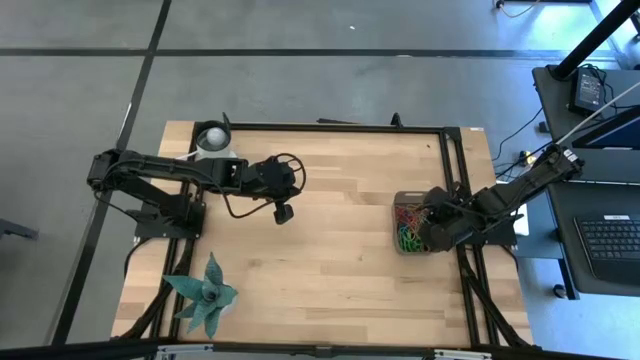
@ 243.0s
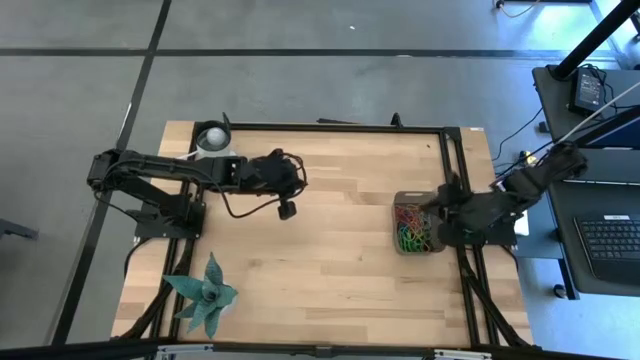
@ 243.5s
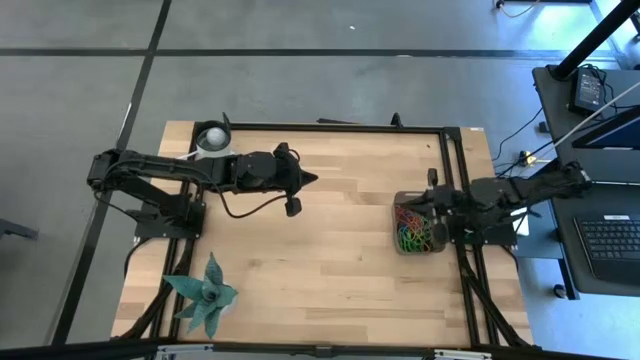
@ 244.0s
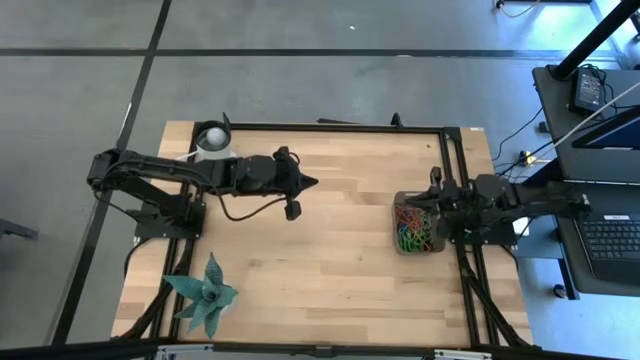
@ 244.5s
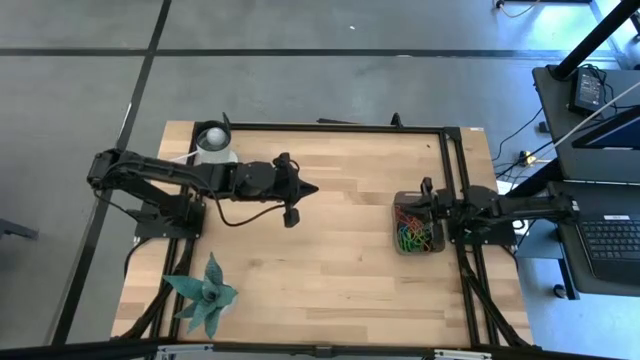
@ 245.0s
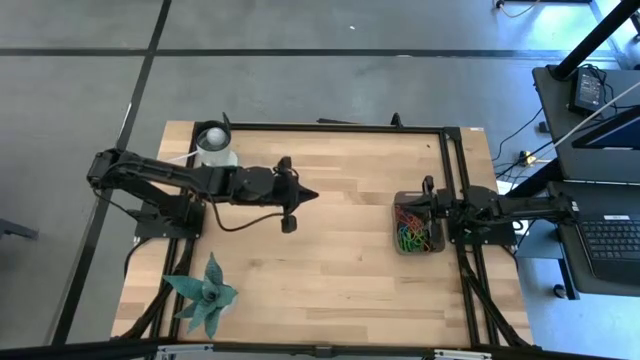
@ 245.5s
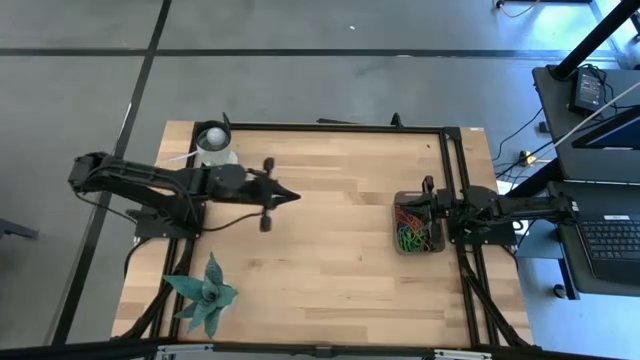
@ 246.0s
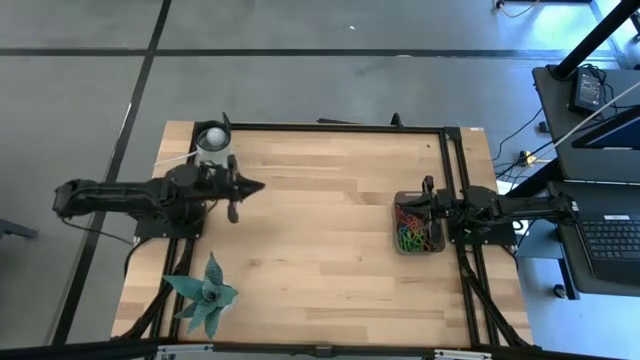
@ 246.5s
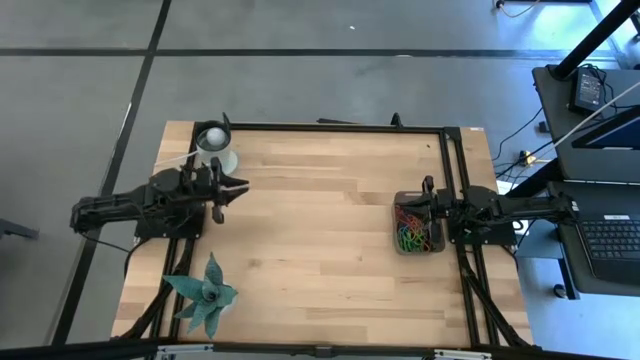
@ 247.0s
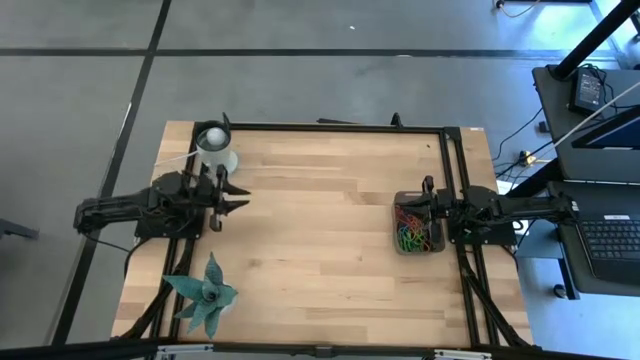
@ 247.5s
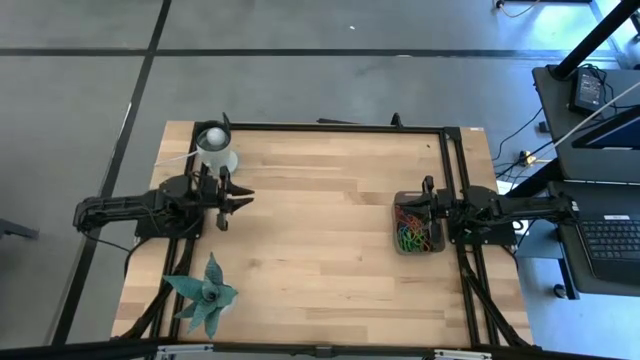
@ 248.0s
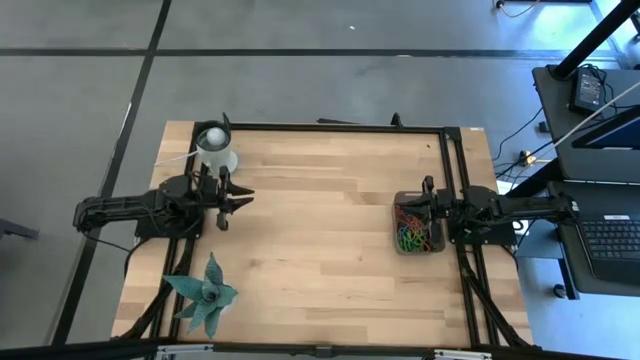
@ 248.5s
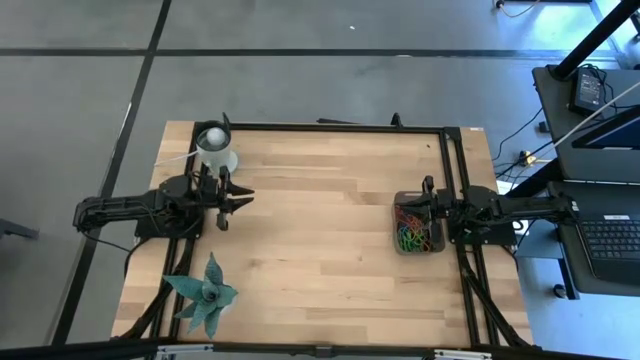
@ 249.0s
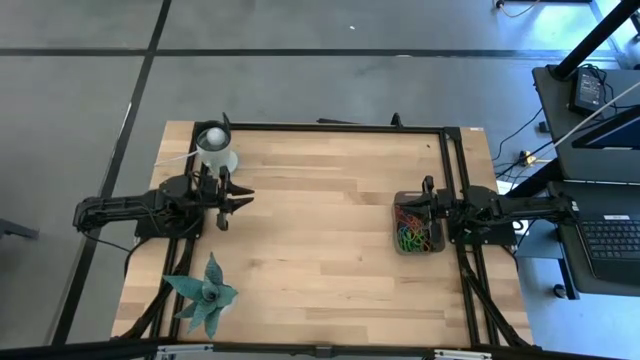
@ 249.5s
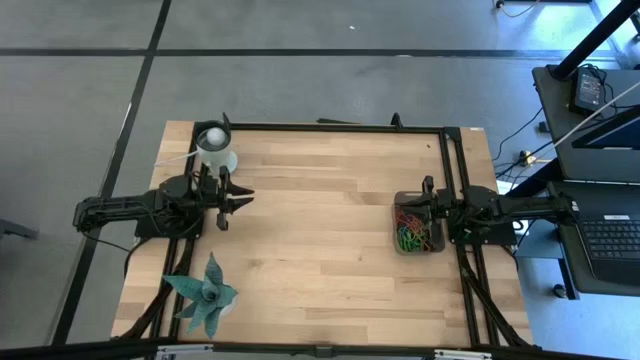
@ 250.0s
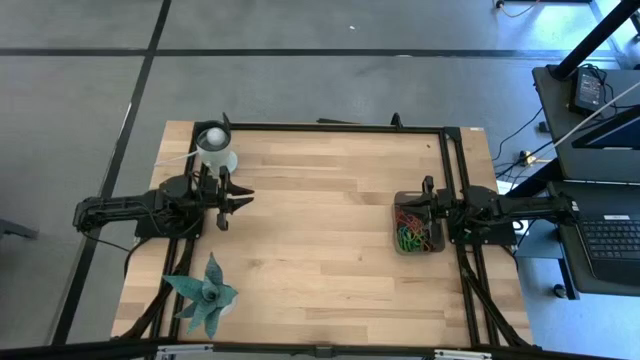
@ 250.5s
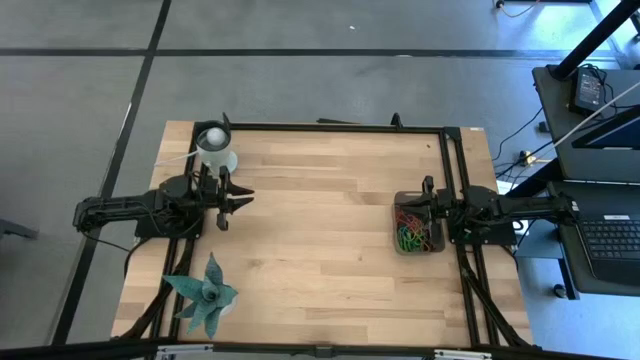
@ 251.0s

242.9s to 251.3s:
Task: Pick and place rubber bands into bin
Return to Home Position

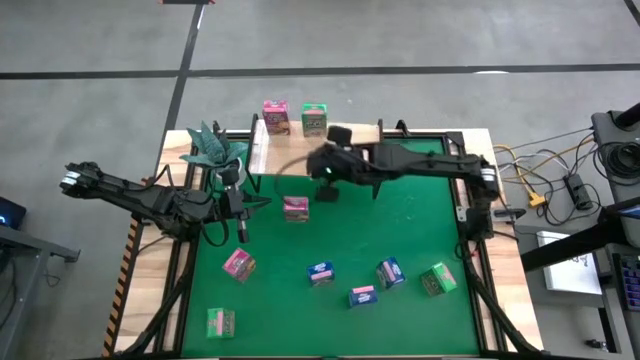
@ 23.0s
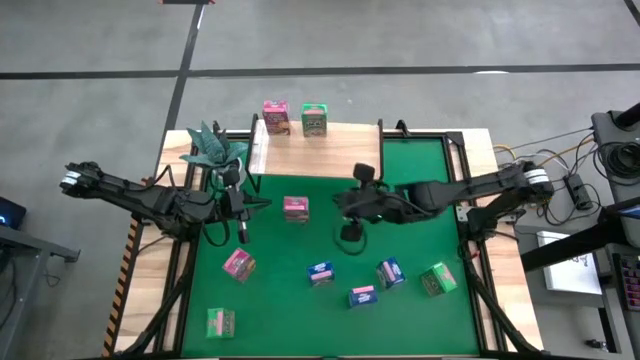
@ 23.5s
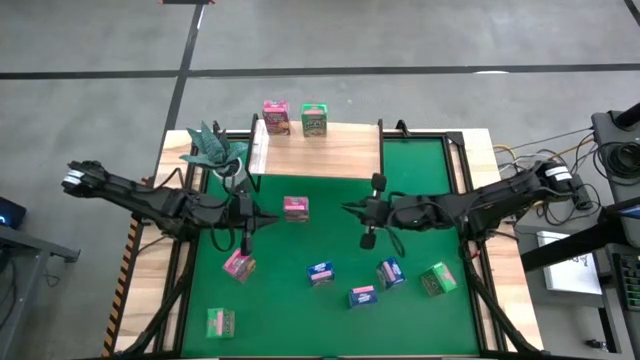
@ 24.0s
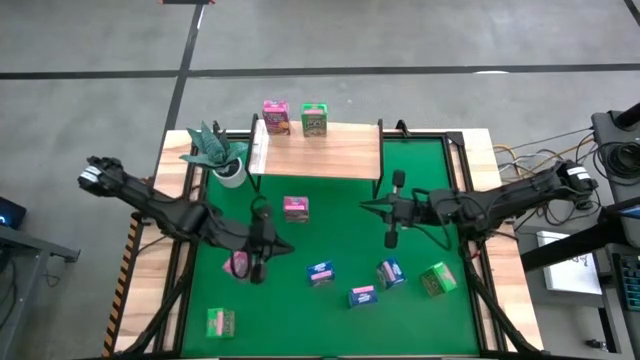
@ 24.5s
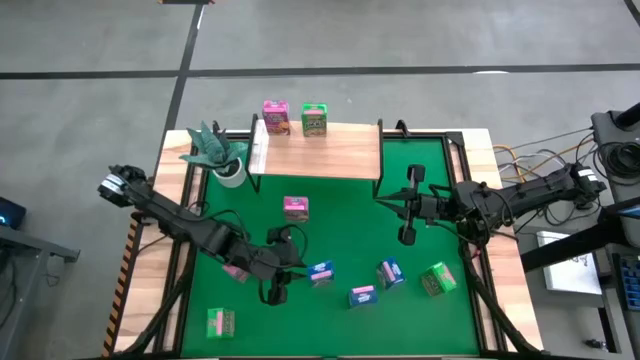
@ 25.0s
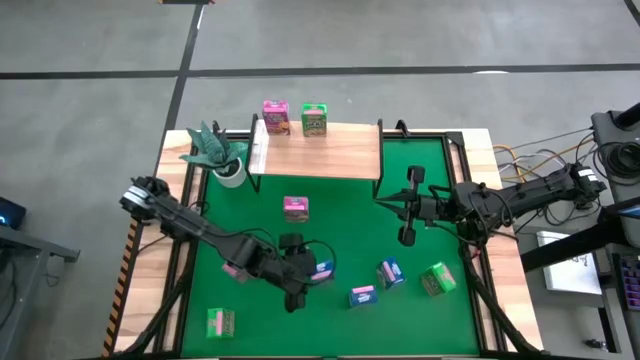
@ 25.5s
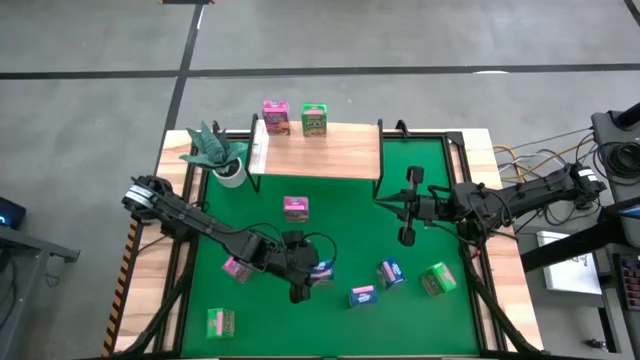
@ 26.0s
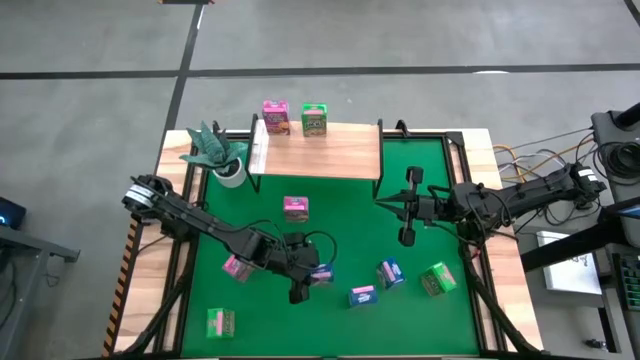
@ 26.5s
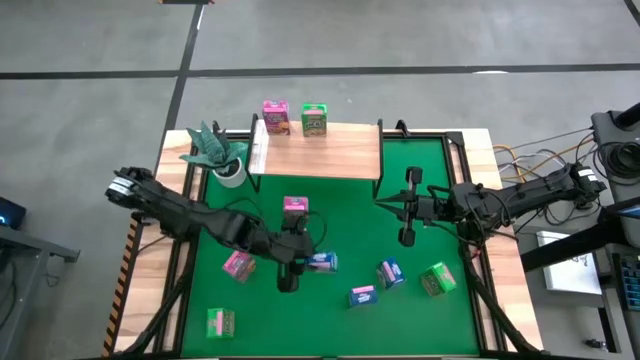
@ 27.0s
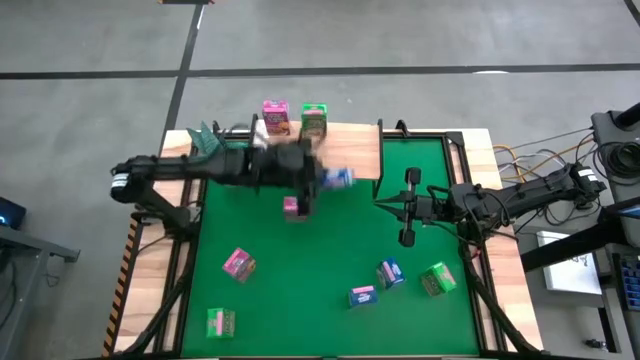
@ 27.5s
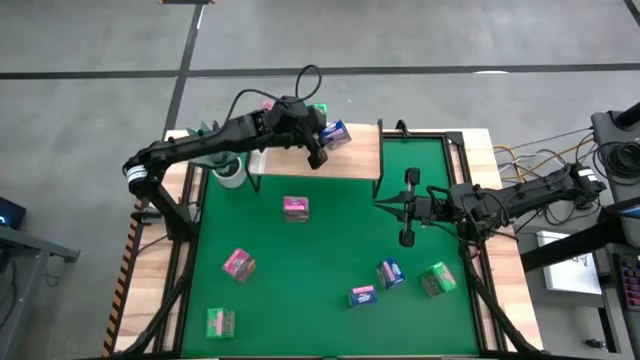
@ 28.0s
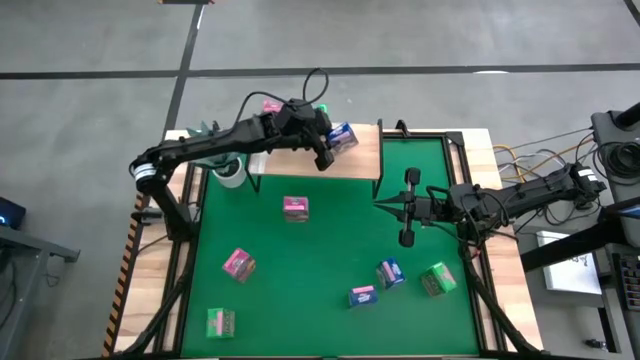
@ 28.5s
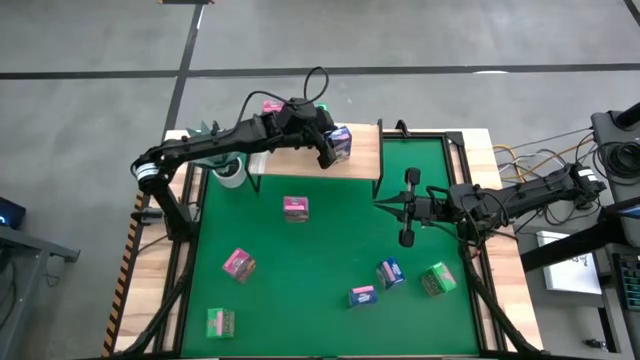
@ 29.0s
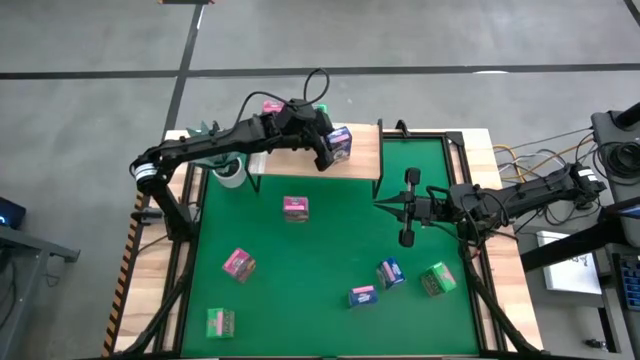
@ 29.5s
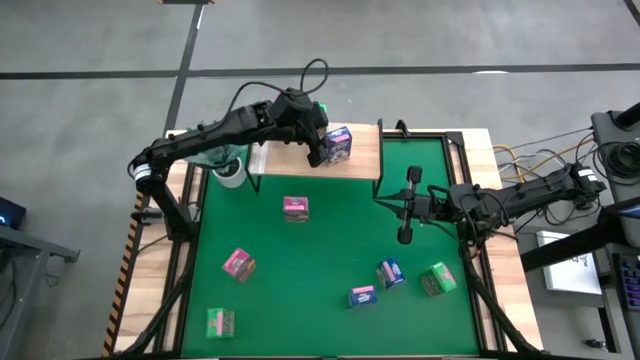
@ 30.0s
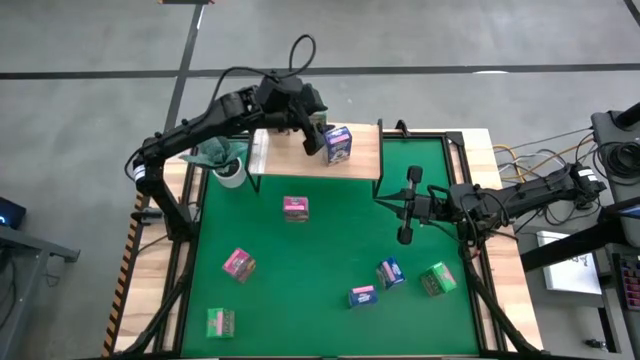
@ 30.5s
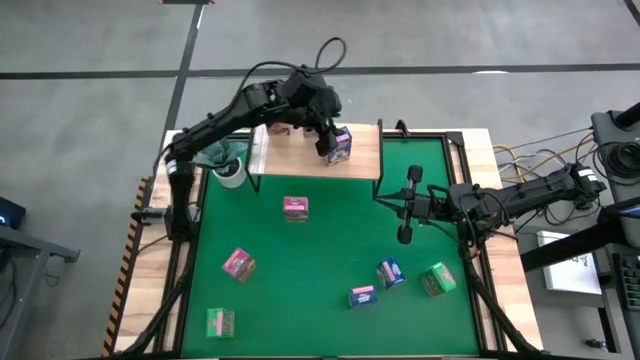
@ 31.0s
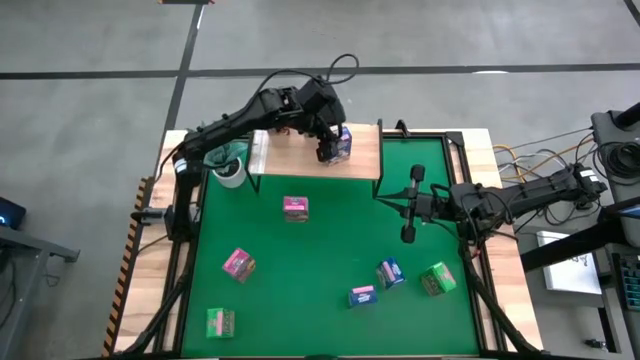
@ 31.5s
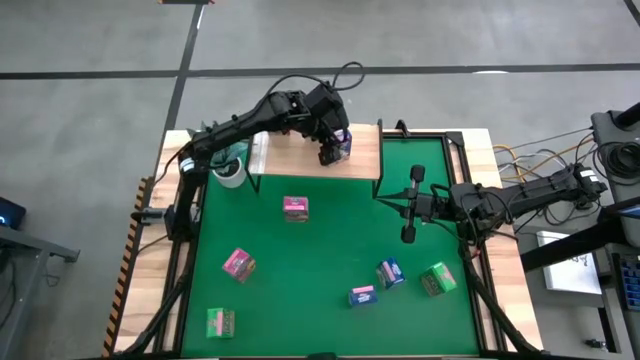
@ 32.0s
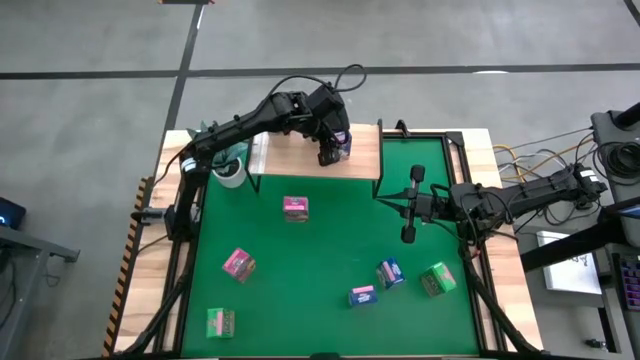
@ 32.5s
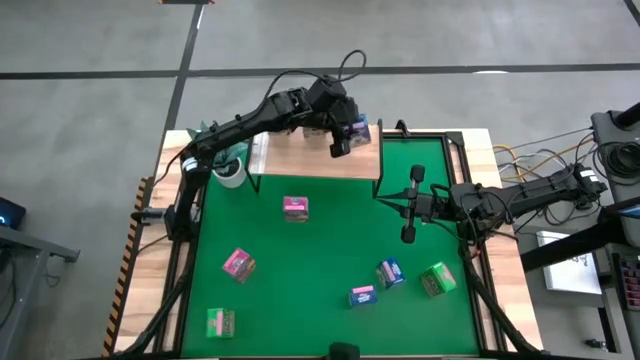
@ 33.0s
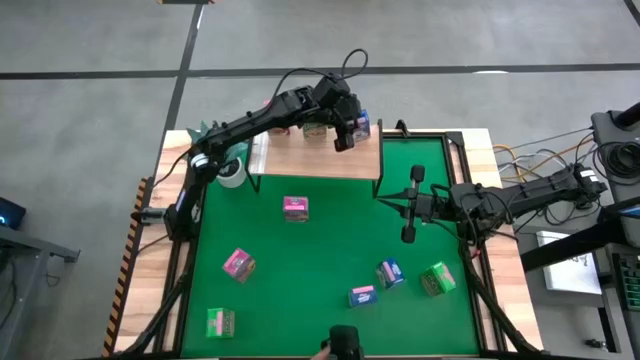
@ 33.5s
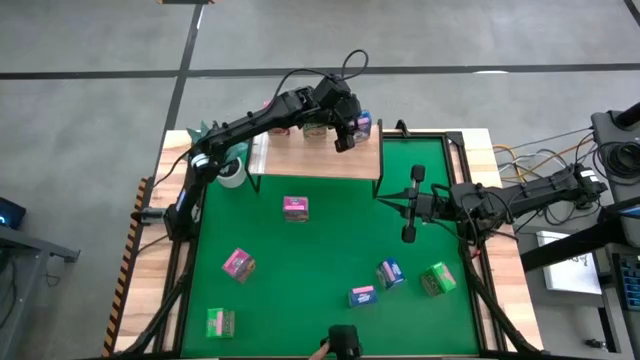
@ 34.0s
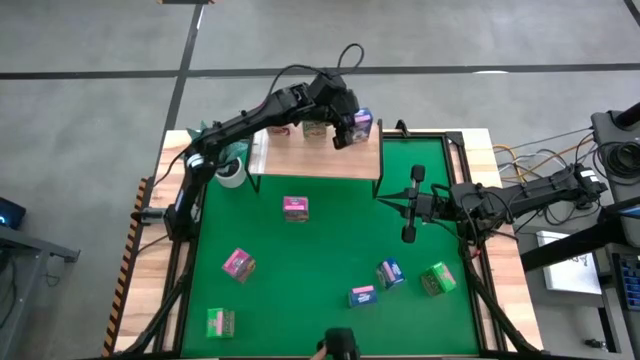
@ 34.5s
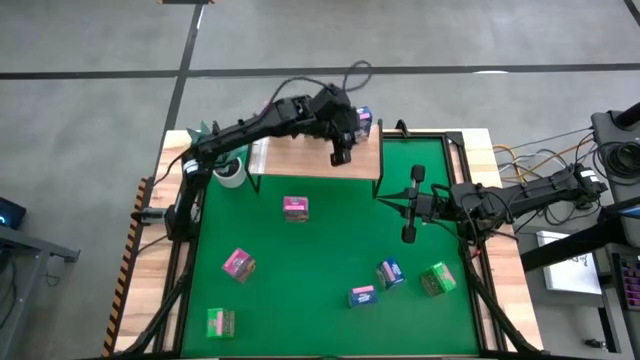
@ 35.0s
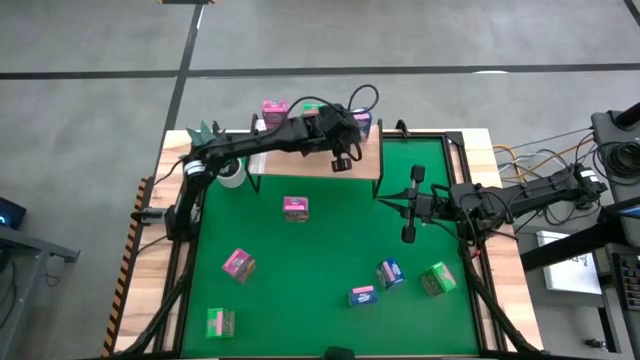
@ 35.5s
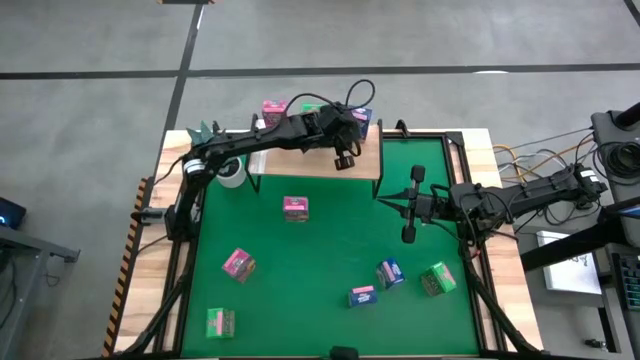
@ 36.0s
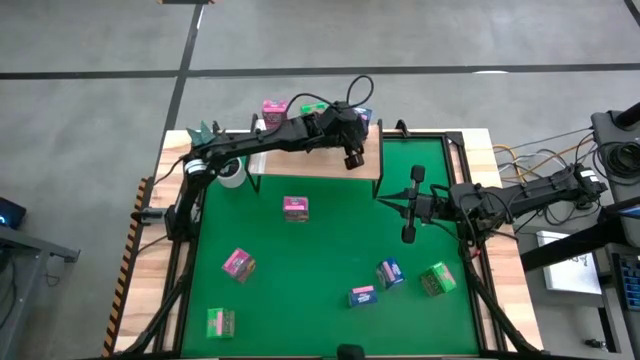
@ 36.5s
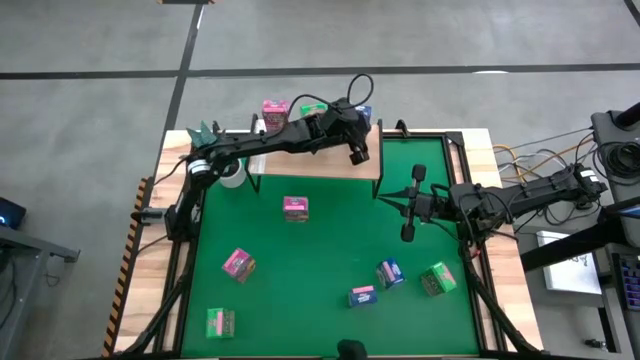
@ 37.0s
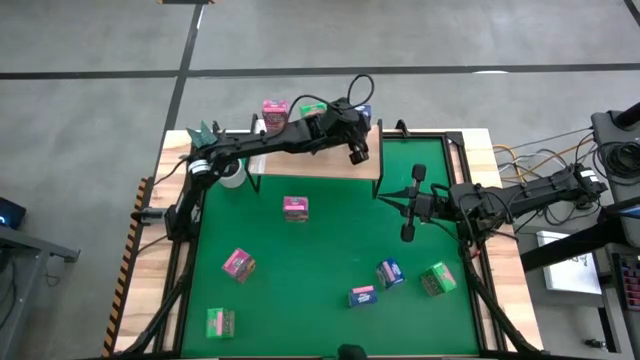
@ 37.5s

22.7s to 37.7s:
Task: Stack cereal on shelf
Put the left blue cereal box on the shelf
